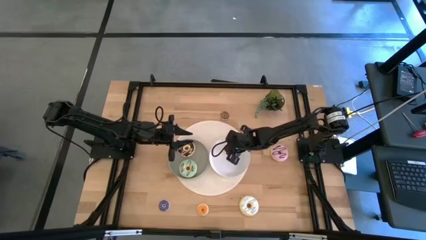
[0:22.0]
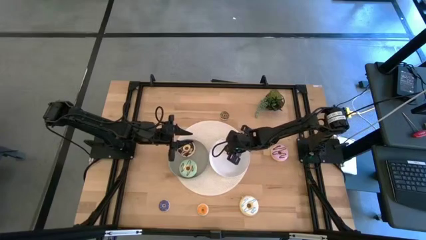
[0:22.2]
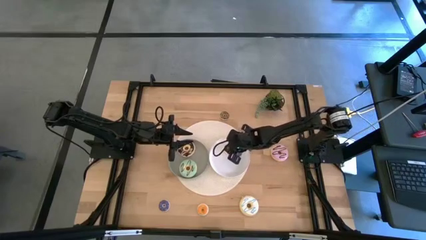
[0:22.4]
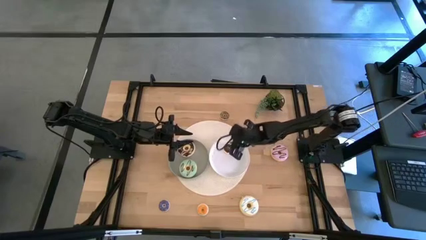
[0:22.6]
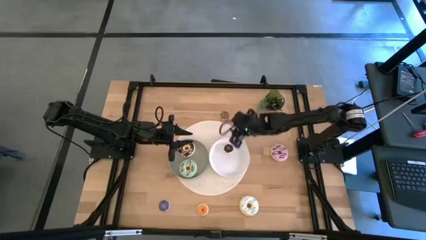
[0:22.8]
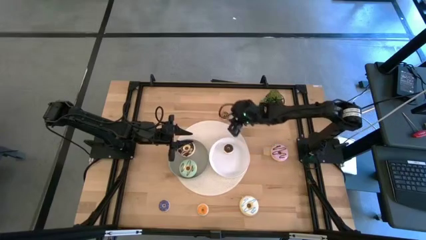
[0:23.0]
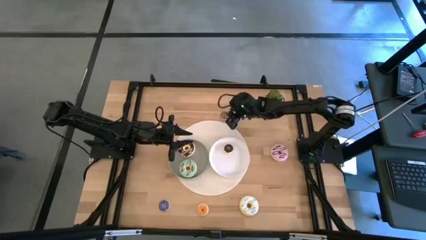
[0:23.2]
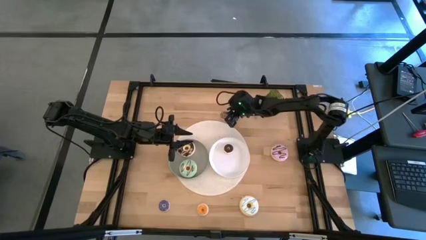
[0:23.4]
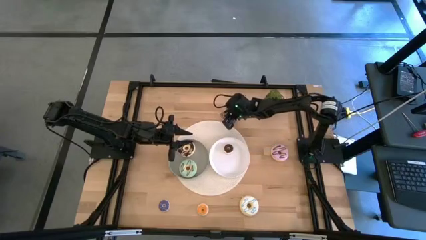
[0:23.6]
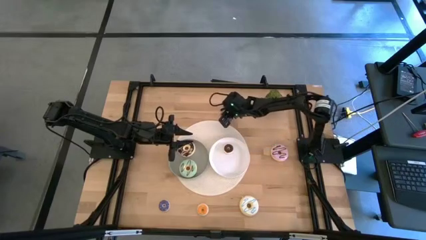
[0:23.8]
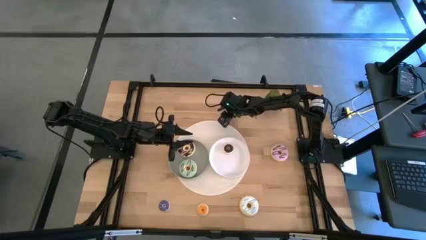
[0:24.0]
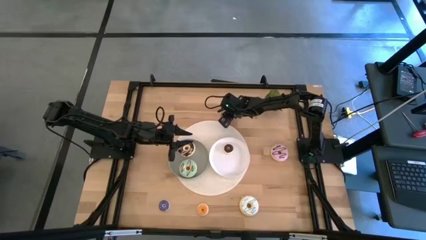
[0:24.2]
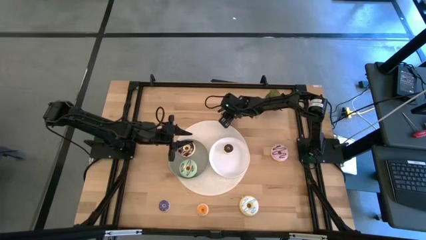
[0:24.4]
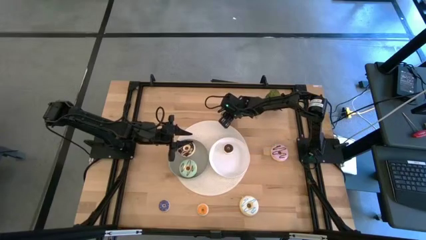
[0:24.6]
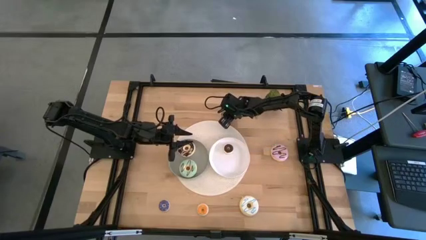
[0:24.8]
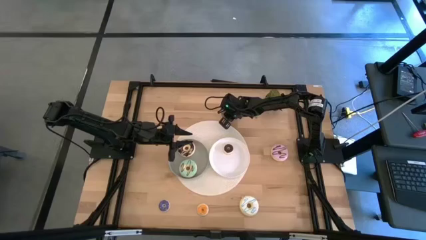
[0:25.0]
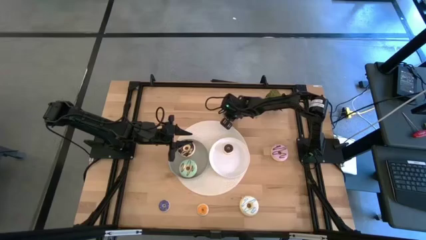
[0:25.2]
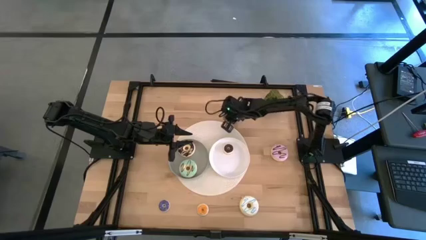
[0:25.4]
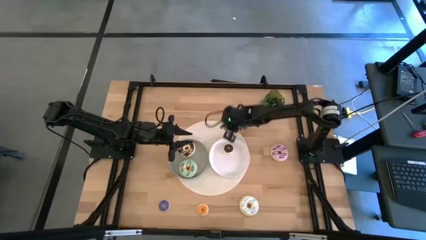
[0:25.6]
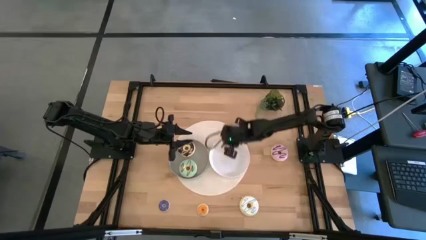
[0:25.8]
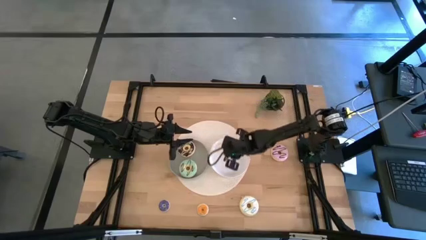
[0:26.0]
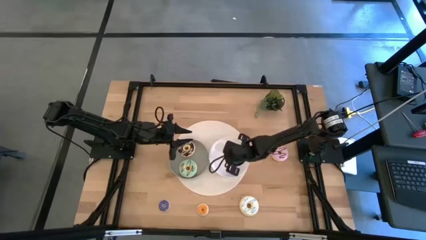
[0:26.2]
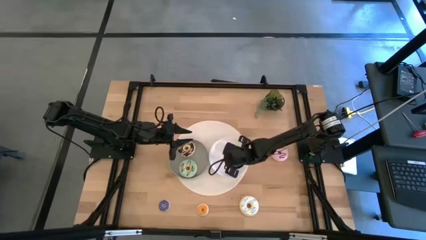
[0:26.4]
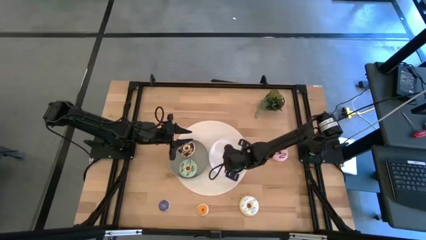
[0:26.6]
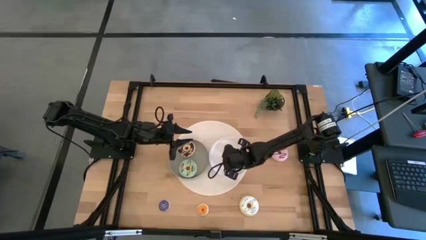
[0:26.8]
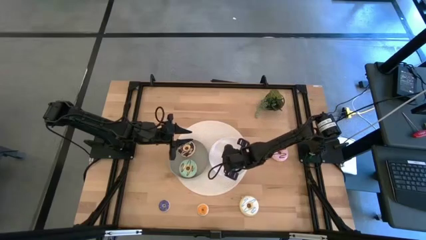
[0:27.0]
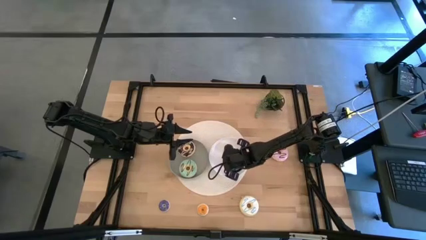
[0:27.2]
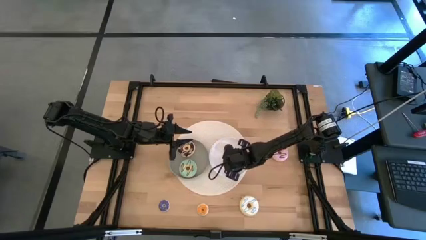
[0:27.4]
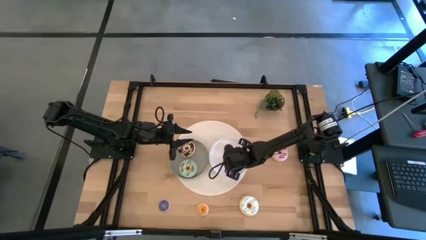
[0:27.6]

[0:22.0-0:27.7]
Task: Pick & Place donuts
Put the small brown donut on the white plate

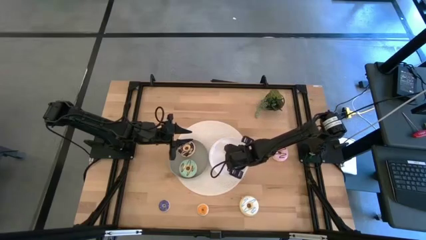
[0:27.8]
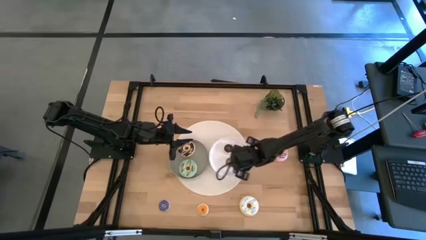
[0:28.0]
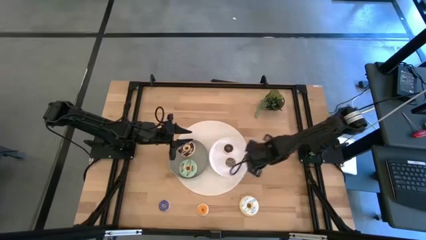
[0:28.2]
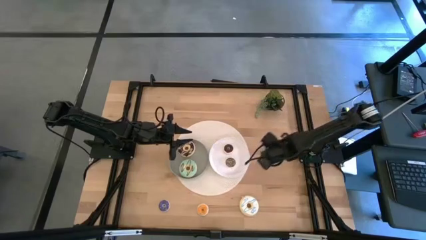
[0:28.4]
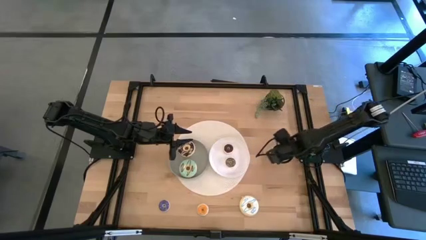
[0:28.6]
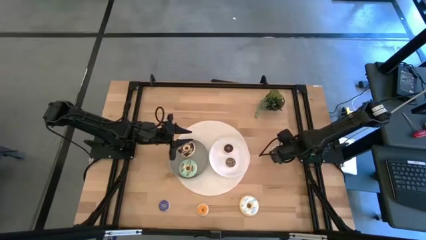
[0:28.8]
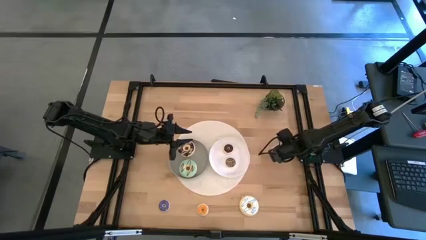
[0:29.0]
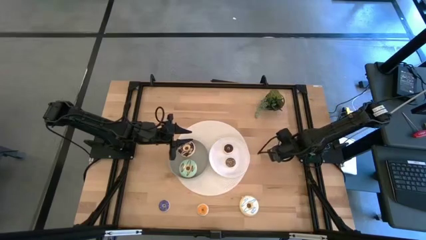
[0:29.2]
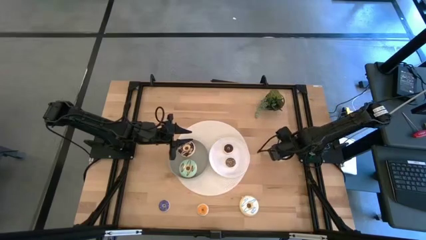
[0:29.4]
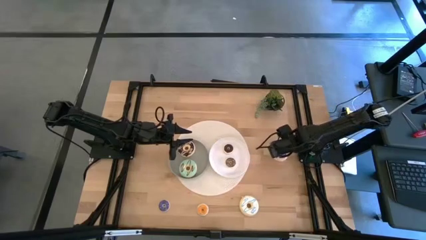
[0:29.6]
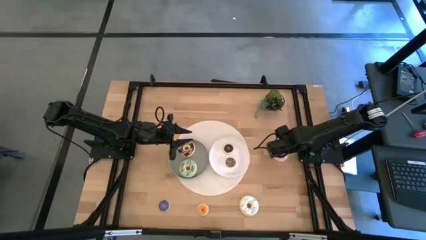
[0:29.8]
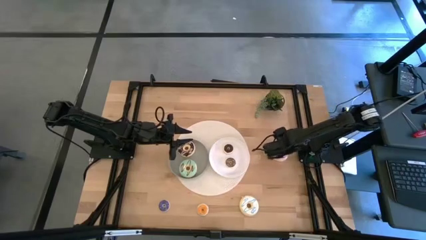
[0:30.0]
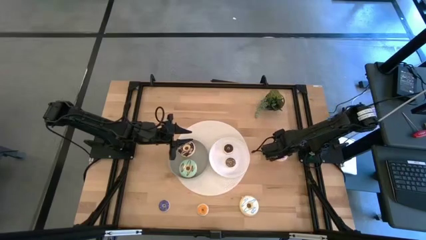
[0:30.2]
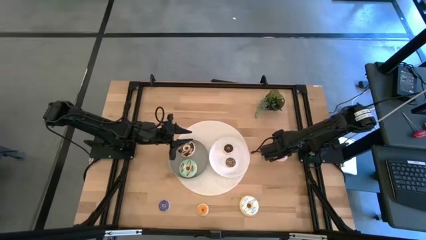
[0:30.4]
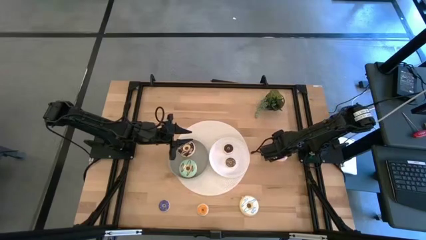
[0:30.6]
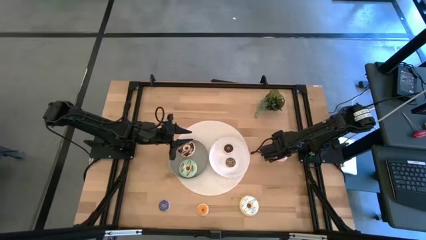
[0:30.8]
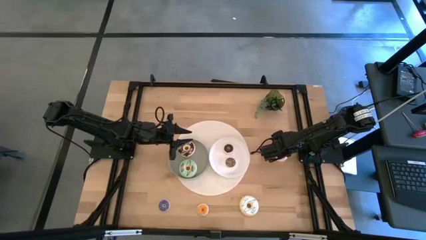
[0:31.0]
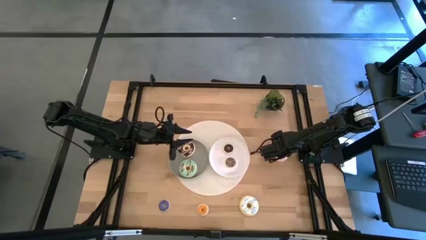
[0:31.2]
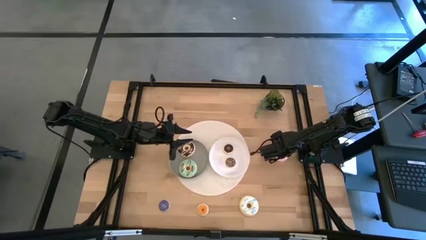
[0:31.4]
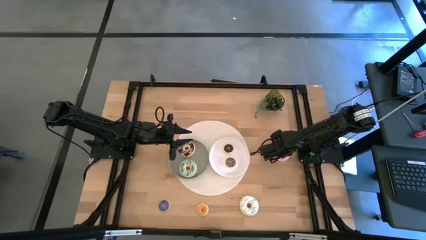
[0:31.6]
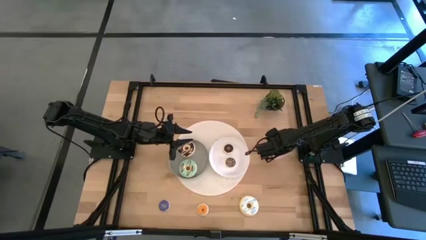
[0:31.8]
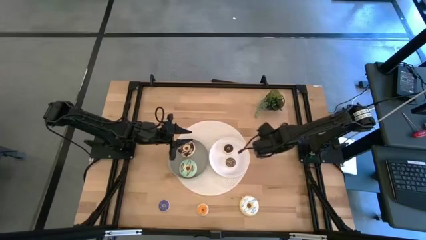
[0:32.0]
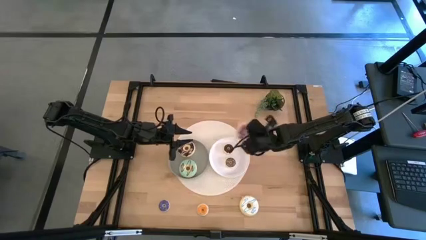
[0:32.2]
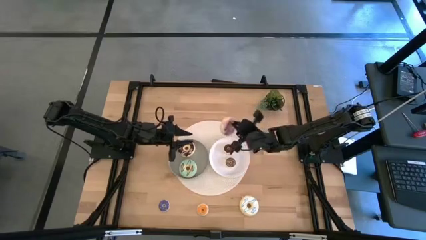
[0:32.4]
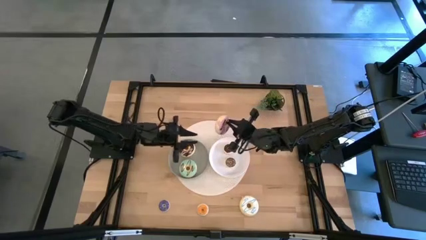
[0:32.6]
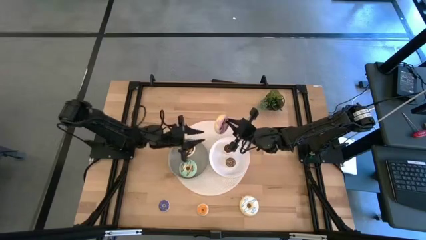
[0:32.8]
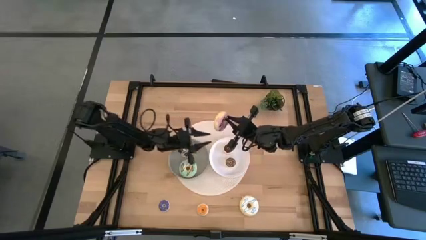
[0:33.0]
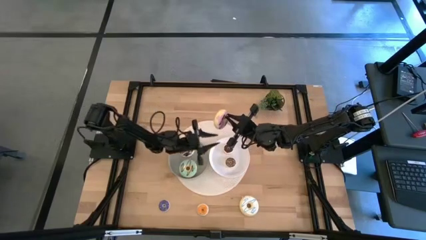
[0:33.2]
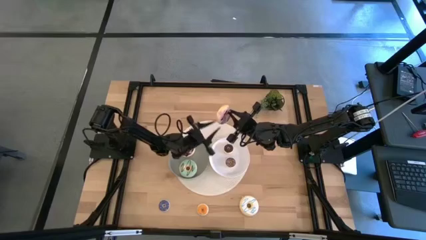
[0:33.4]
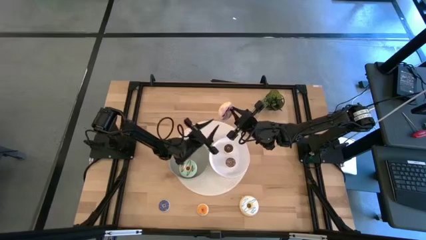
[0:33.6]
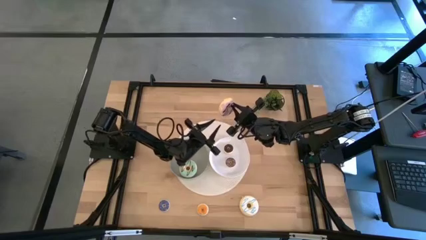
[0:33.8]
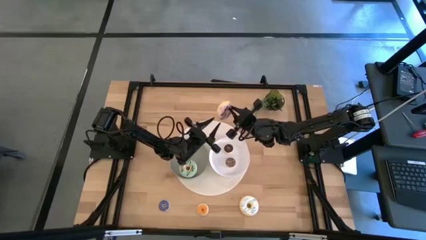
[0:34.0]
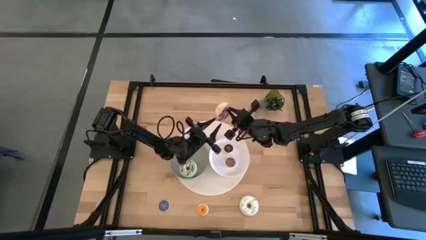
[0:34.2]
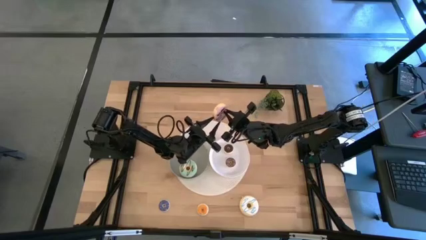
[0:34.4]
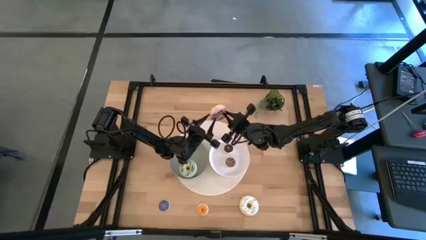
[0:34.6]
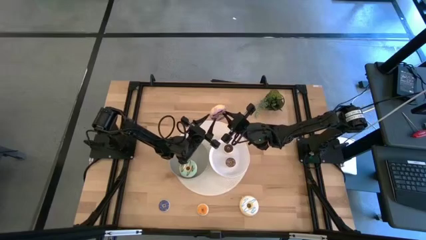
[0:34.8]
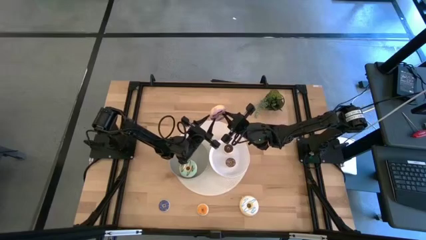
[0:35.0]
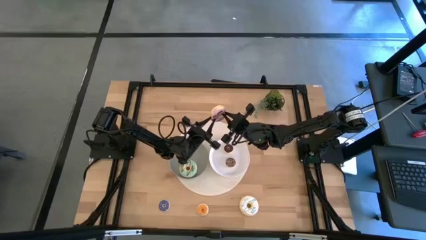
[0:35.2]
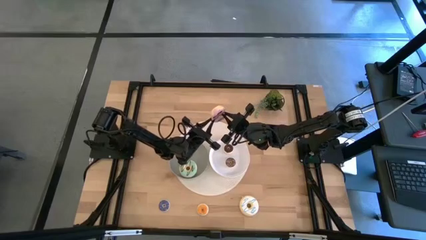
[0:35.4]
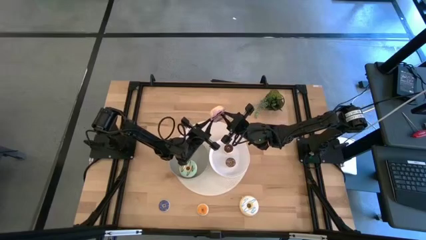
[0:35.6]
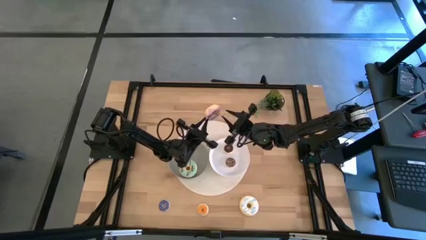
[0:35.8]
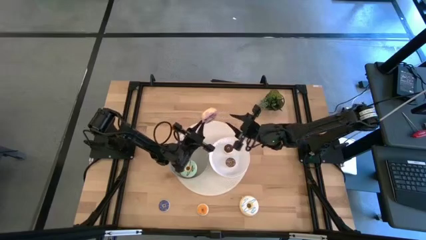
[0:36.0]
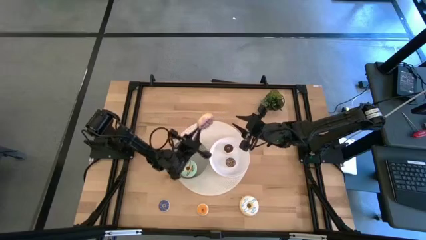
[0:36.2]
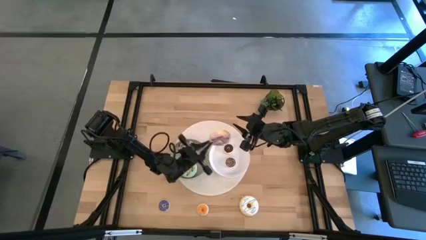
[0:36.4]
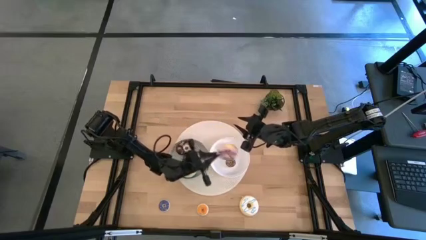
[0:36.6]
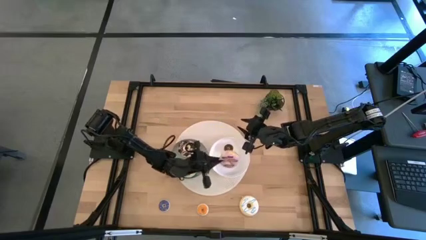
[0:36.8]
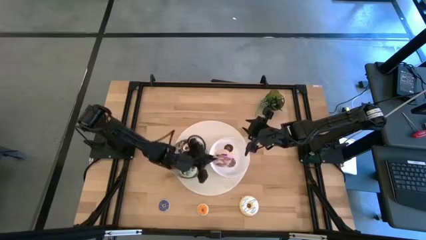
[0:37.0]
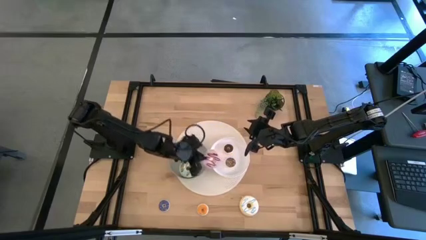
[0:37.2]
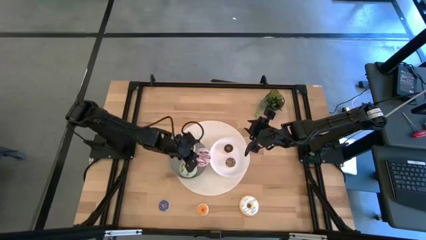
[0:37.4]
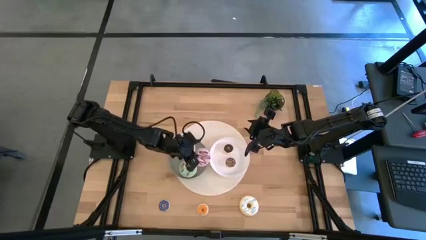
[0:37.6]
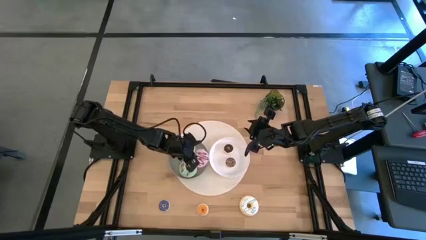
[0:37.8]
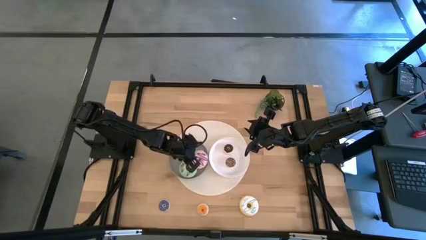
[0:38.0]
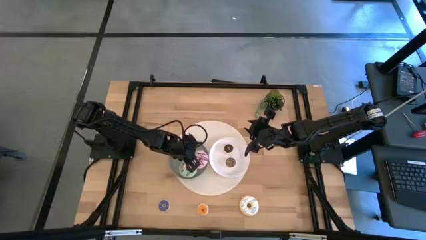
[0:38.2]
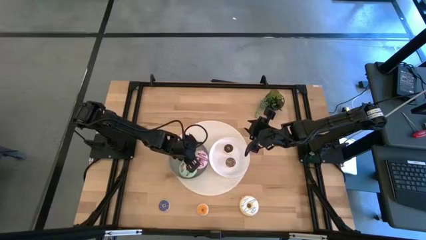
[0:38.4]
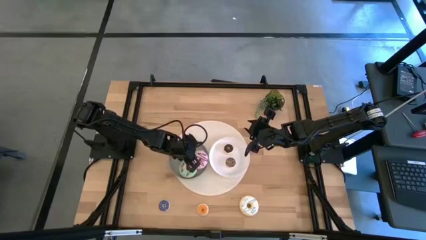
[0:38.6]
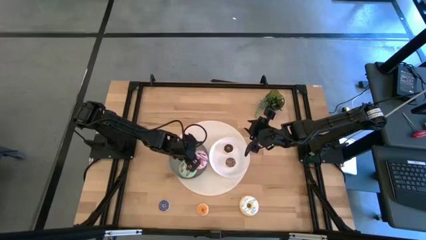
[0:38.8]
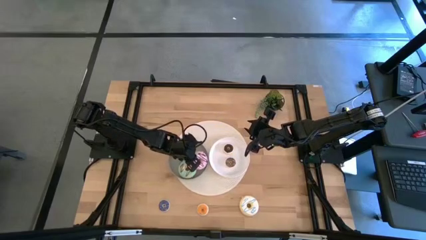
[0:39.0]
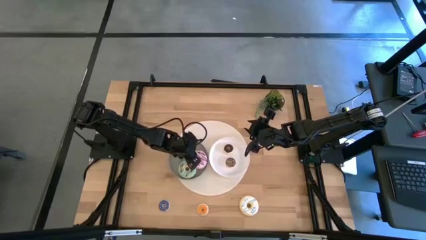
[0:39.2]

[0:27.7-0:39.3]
Put the large purple donut on the gray plate
